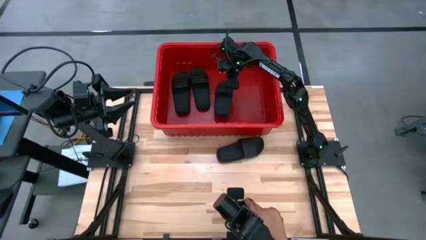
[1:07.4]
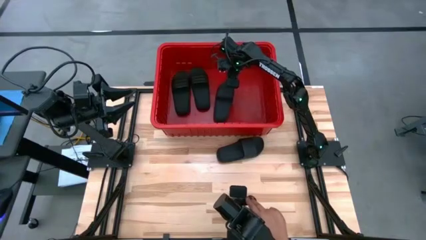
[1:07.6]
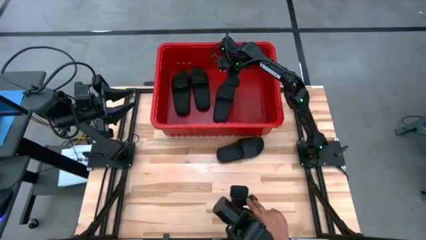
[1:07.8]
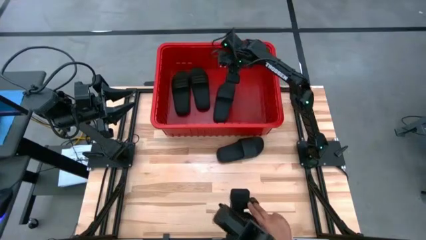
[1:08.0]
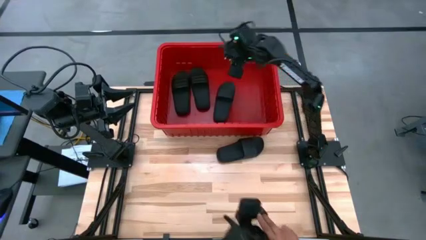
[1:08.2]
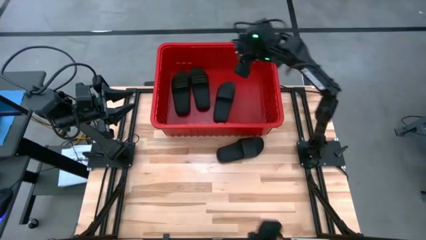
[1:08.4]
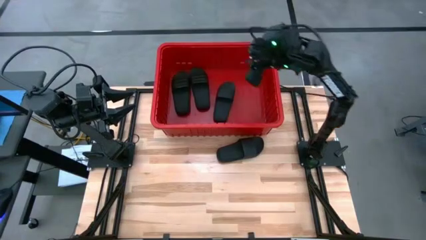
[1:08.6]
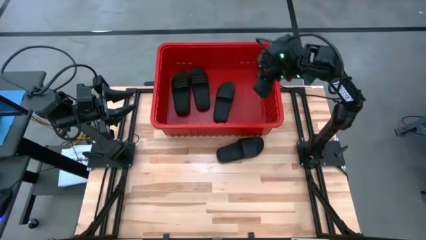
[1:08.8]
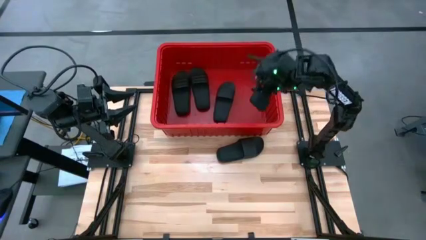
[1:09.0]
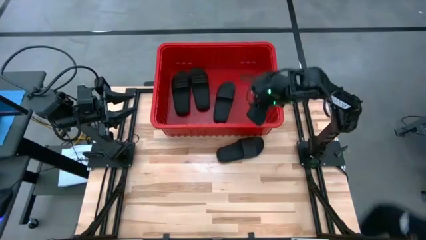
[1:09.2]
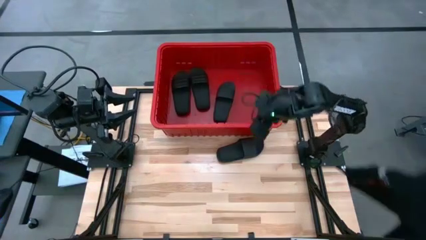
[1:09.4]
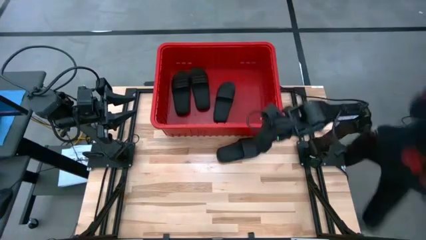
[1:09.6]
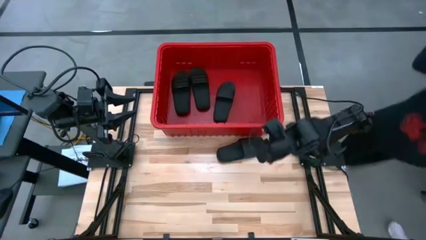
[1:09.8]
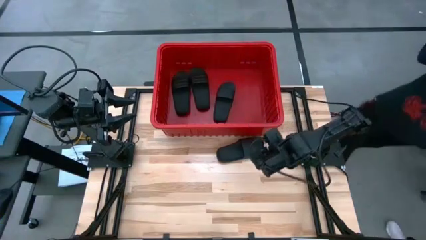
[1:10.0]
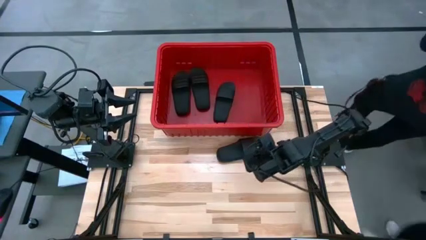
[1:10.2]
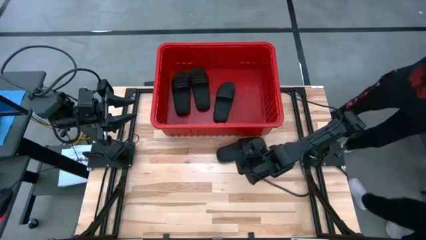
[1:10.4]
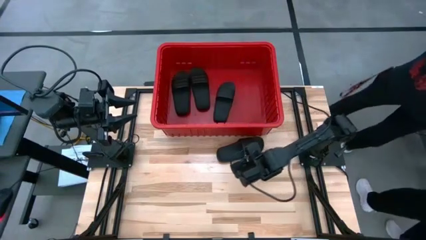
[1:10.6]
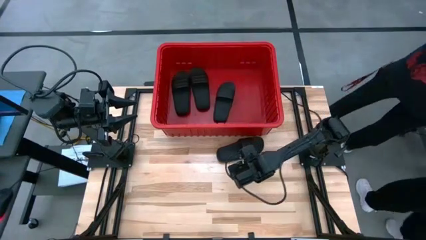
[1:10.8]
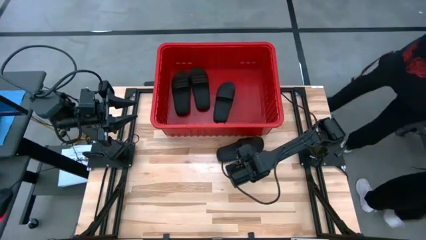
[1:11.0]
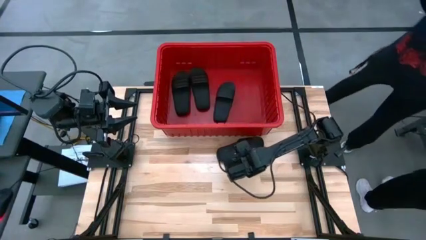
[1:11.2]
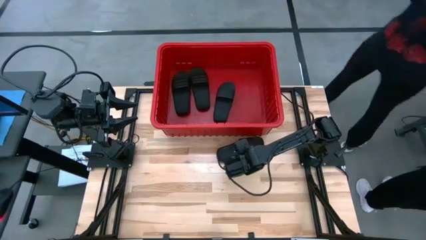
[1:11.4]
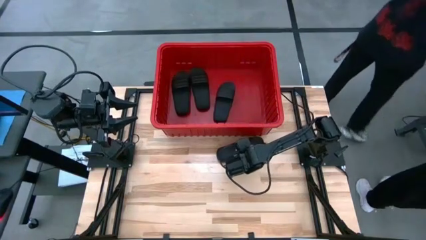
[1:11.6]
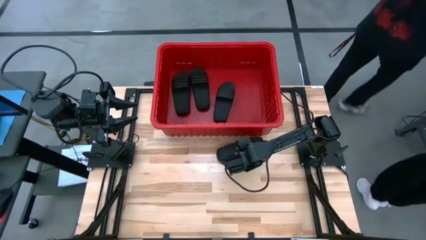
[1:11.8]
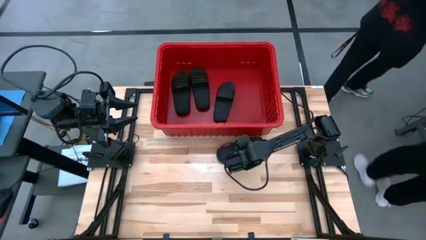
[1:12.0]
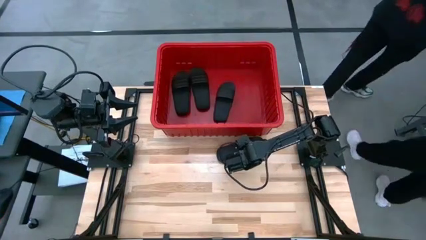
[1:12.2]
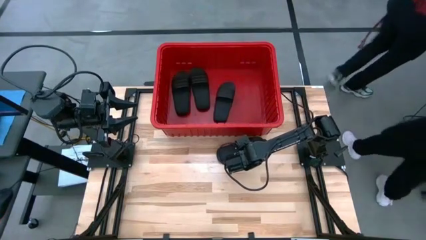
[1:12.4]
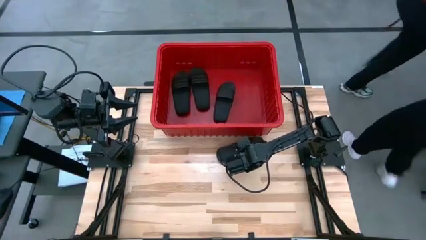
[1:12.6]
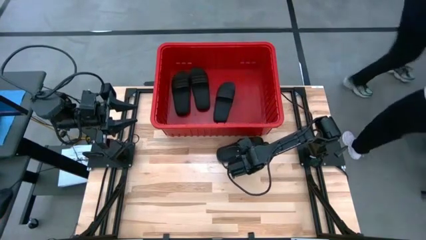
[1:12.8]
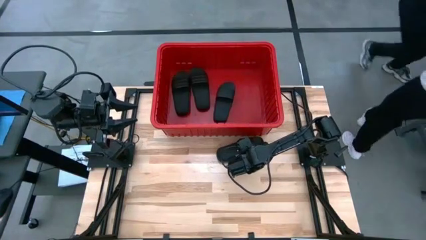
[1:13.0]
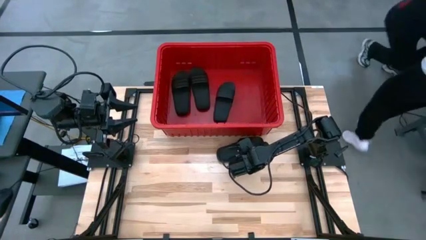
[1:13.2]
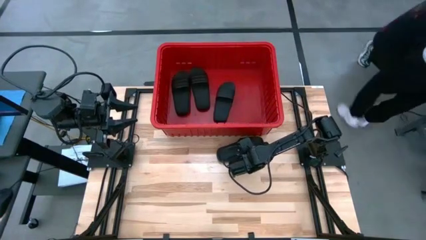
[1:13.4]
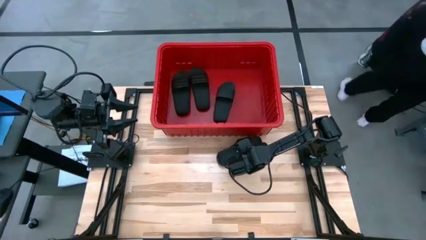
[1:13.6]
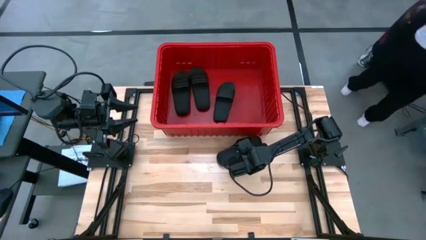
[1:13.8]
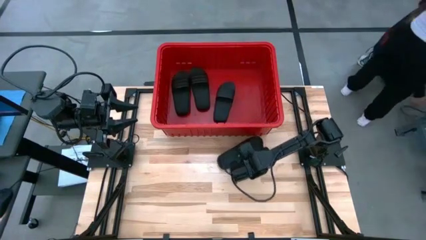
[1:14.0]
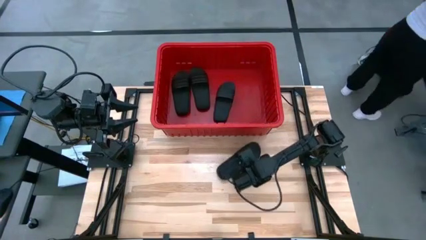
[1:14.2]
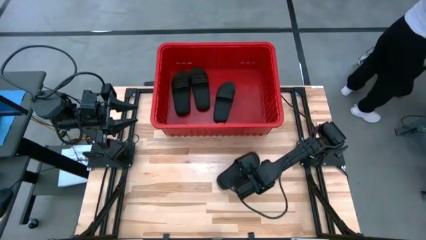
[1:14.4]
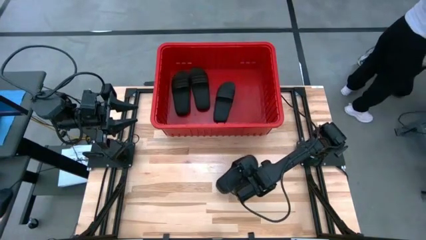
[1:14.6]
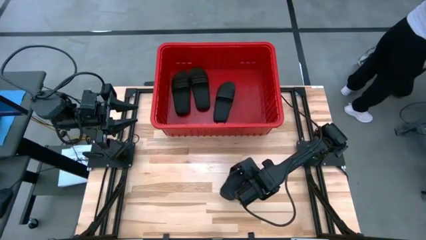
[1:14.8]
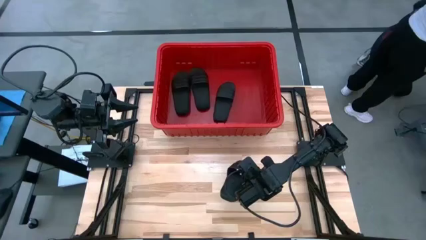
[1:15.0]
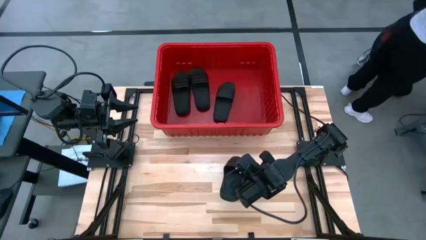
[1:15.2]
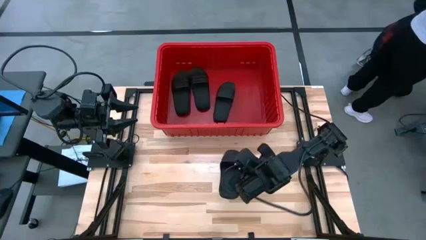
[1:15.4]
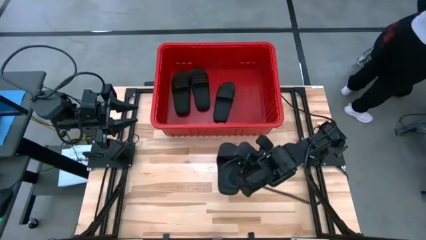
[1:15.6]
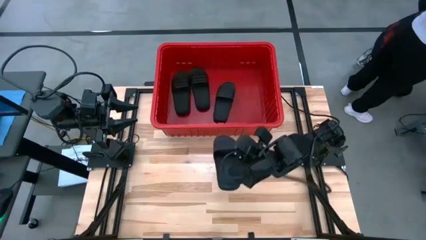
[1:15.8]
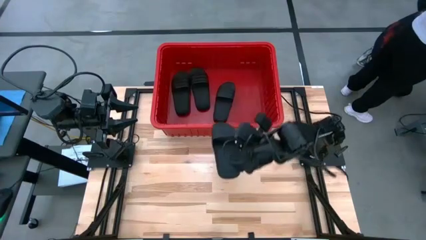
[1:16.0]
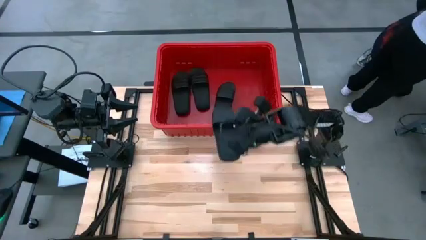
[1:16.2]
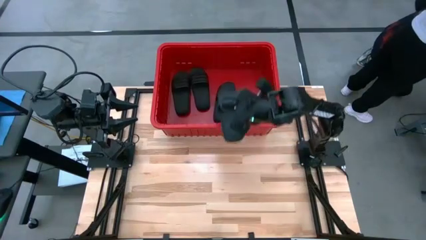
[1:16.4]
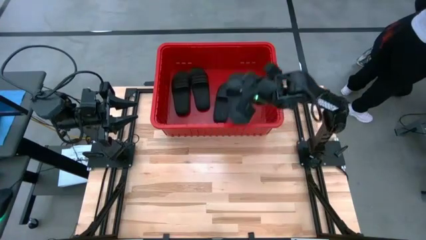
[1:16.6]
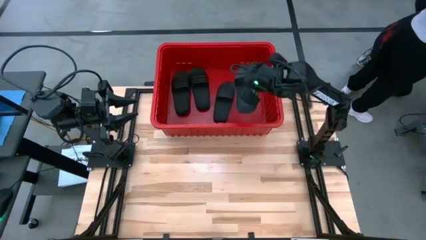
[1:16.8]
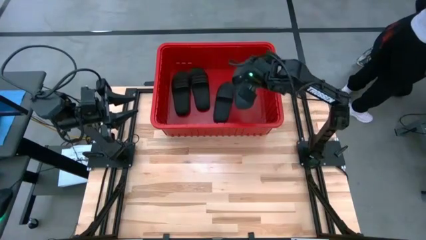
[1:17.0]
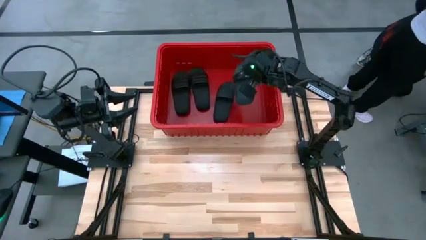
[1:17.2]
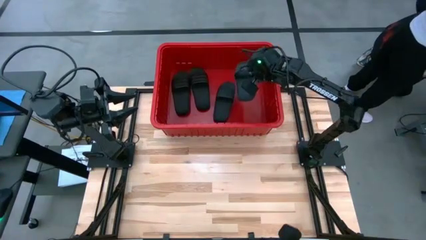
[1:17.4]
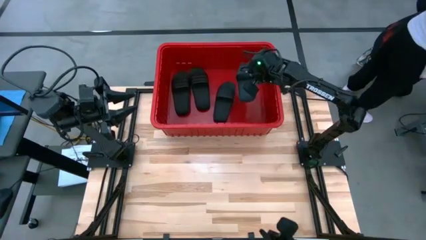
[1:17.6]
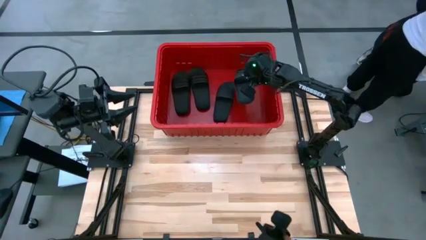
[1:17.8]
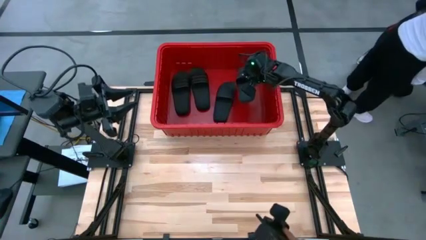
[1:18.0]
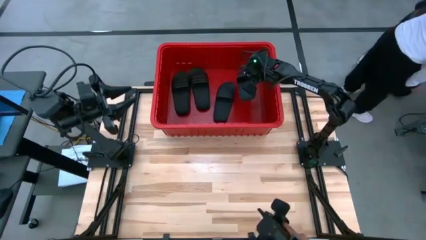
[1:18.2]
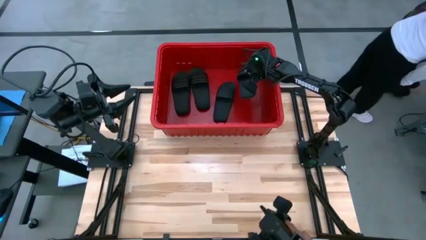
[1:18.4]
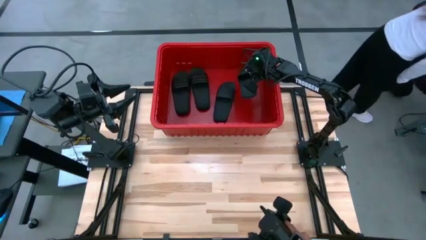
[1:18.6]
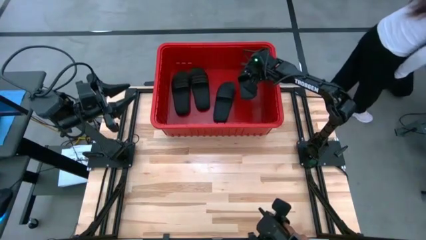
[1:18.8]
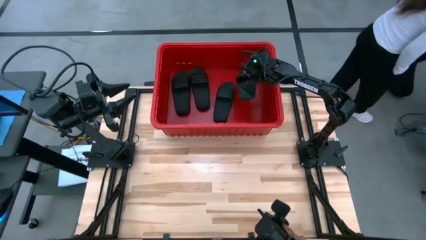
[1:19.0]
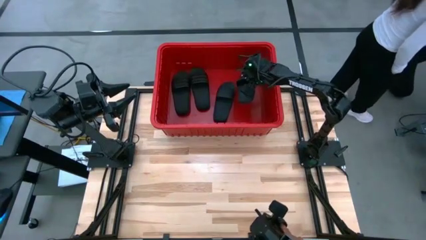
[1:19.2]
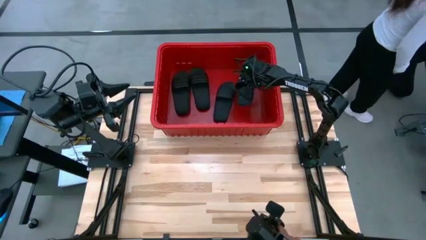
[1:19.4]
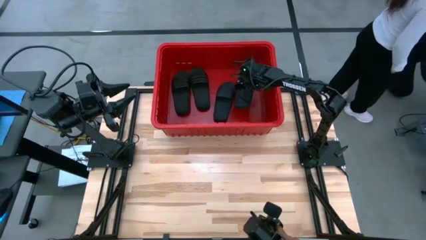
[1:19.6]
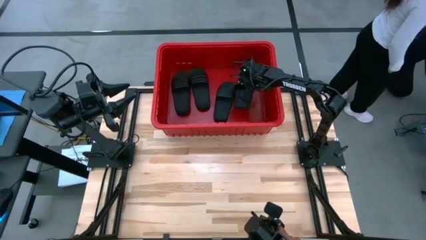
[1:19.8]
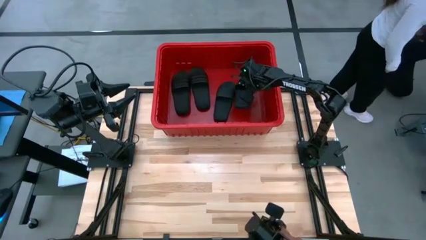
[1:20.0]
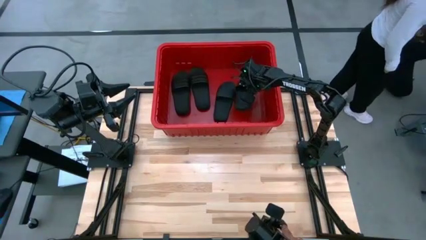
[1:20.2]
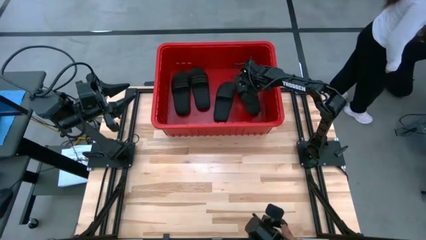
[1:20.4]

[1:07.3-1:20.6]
Task: Pick and place slides into bin
Put the black slide into the red bin
